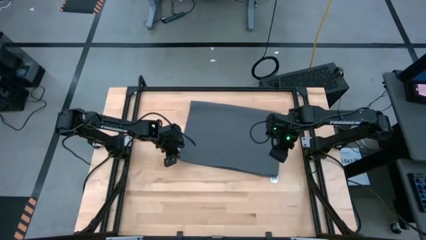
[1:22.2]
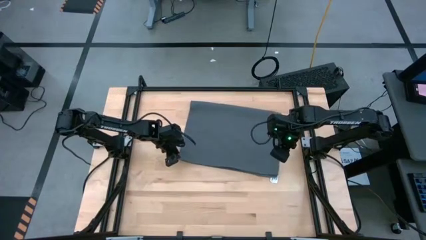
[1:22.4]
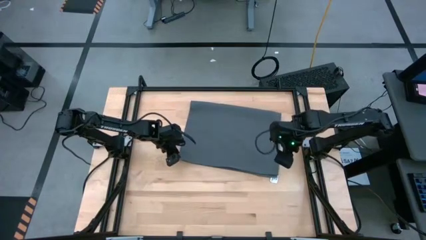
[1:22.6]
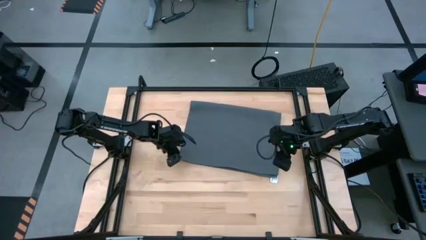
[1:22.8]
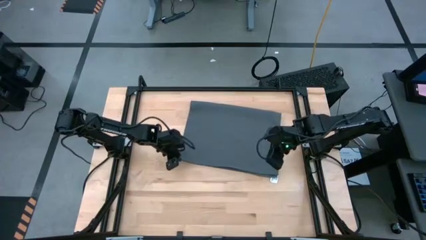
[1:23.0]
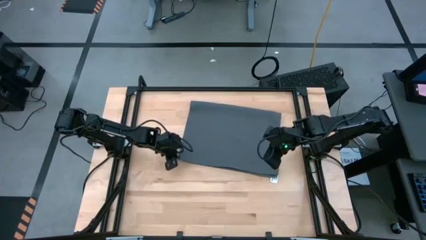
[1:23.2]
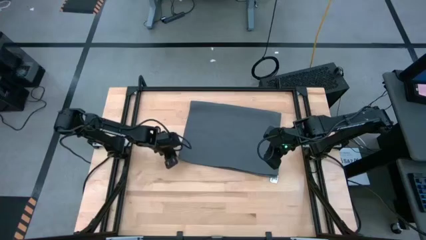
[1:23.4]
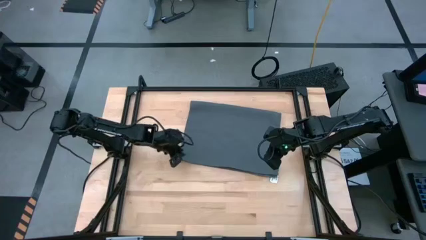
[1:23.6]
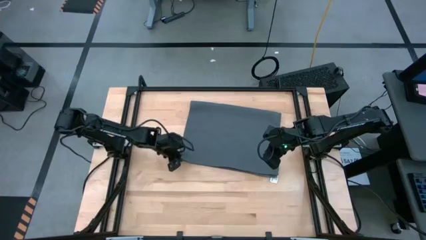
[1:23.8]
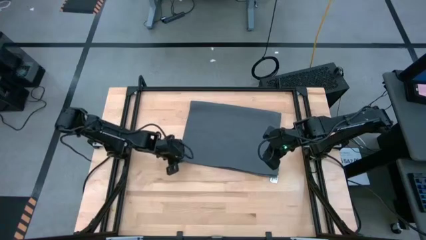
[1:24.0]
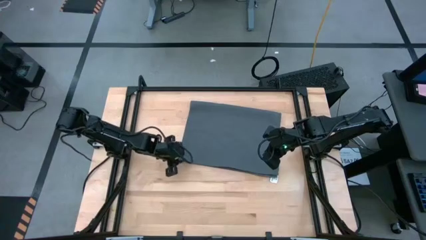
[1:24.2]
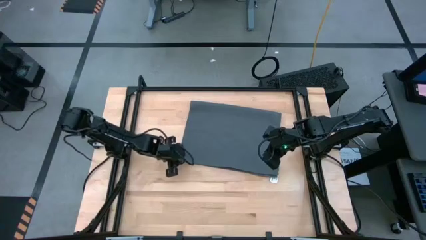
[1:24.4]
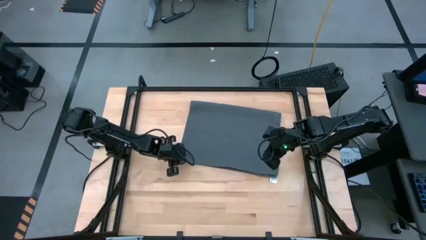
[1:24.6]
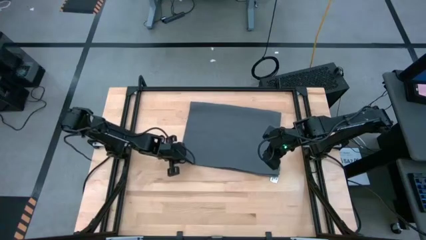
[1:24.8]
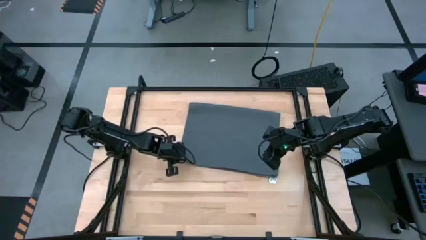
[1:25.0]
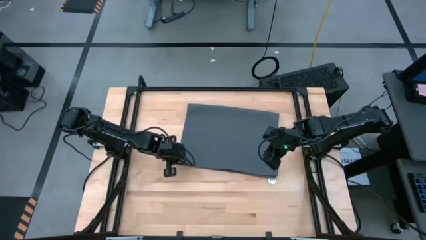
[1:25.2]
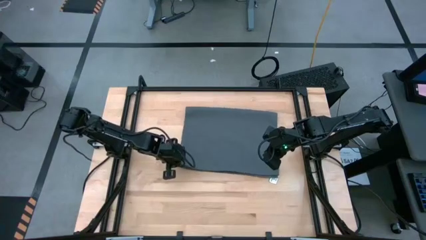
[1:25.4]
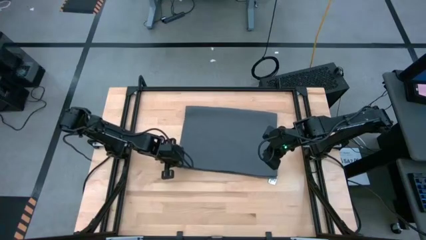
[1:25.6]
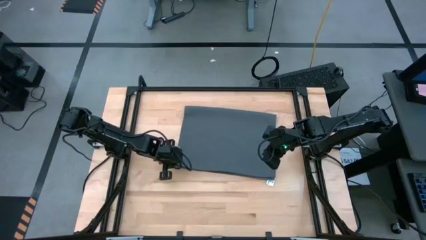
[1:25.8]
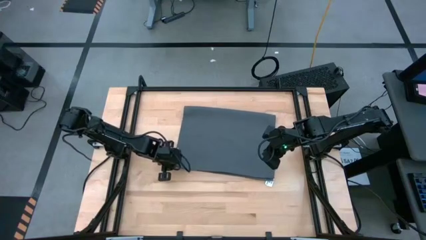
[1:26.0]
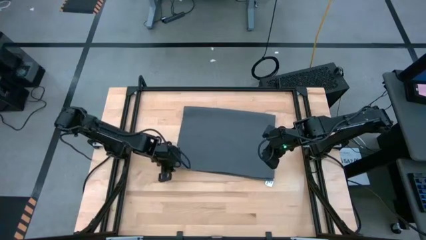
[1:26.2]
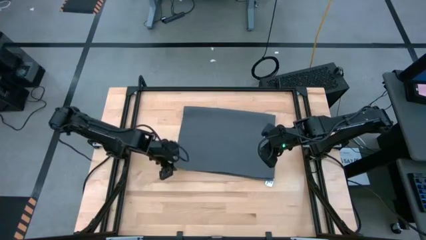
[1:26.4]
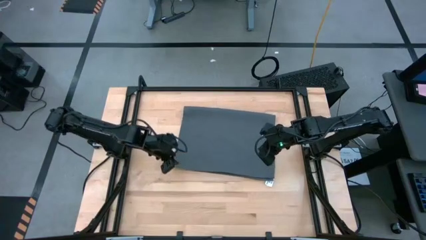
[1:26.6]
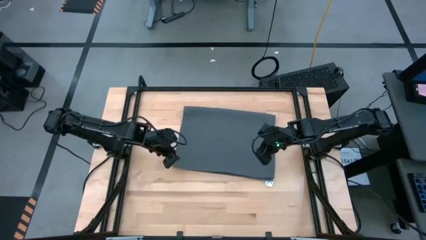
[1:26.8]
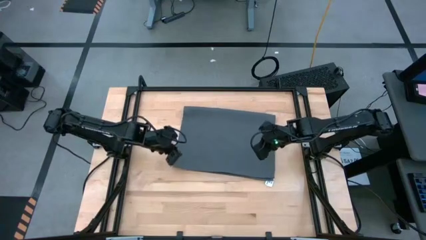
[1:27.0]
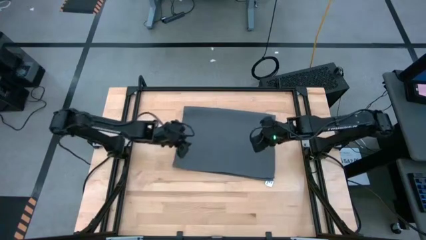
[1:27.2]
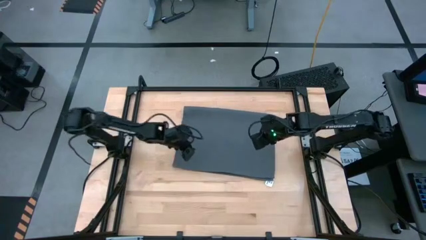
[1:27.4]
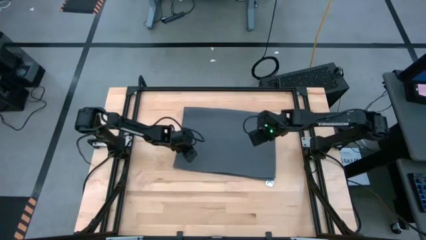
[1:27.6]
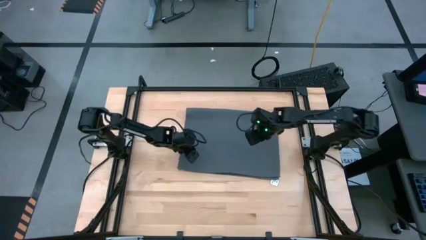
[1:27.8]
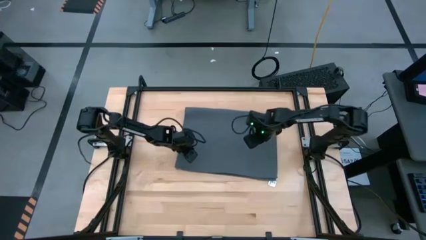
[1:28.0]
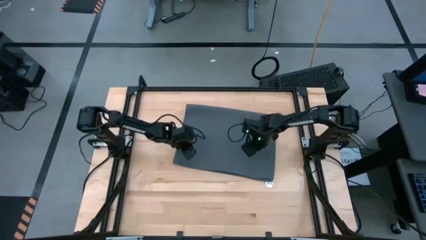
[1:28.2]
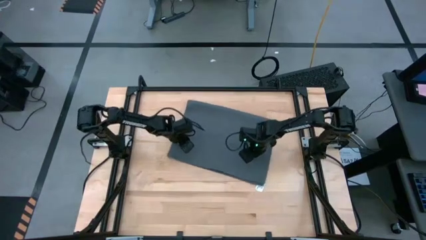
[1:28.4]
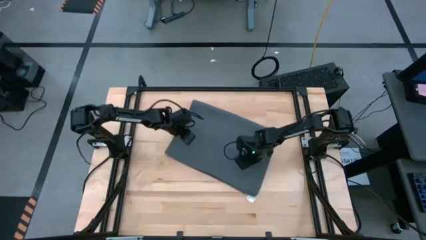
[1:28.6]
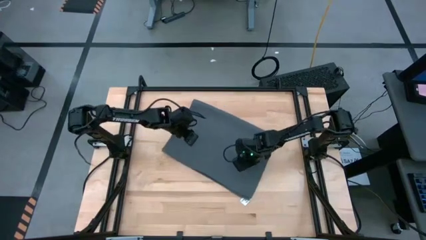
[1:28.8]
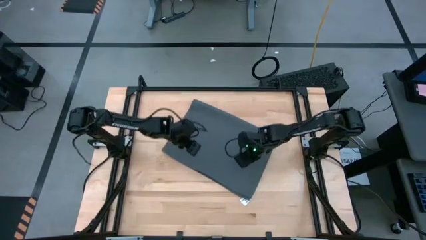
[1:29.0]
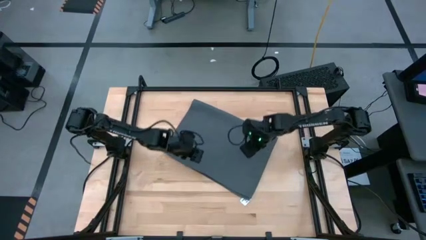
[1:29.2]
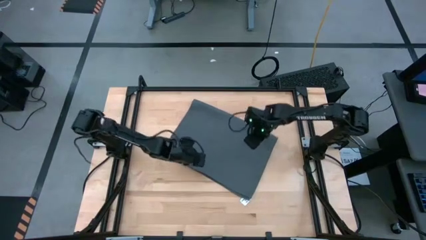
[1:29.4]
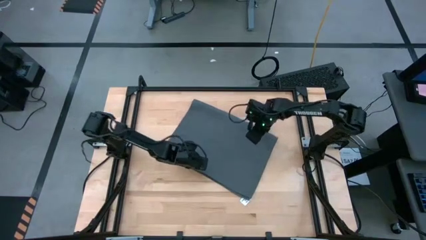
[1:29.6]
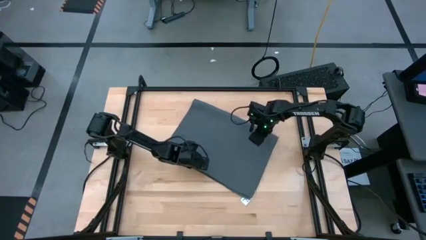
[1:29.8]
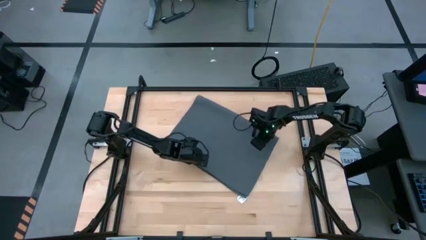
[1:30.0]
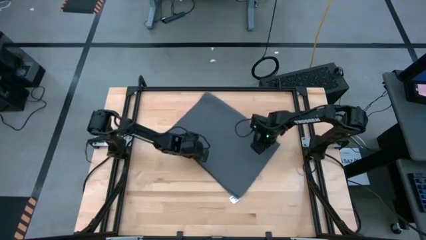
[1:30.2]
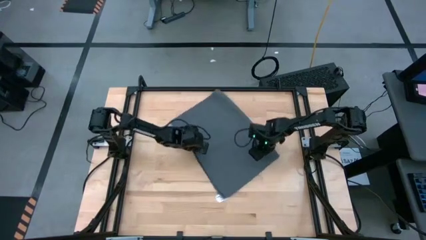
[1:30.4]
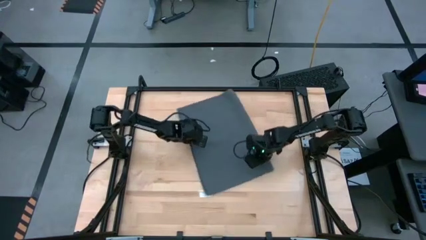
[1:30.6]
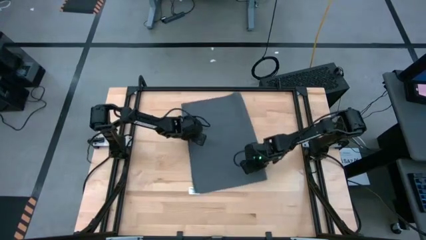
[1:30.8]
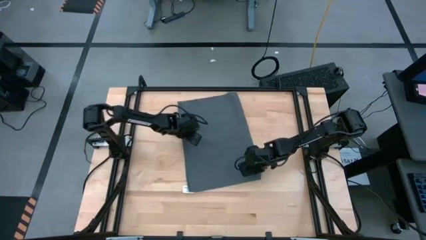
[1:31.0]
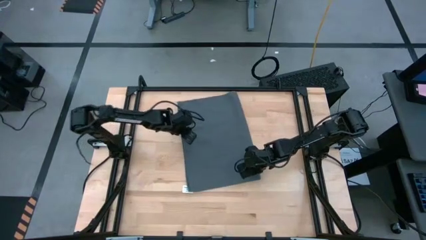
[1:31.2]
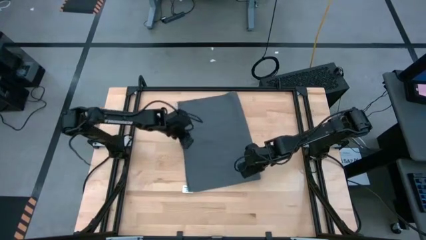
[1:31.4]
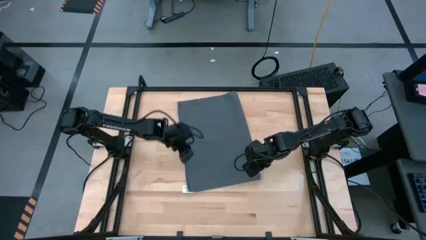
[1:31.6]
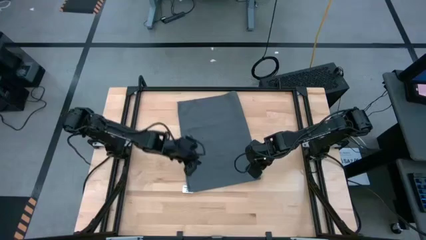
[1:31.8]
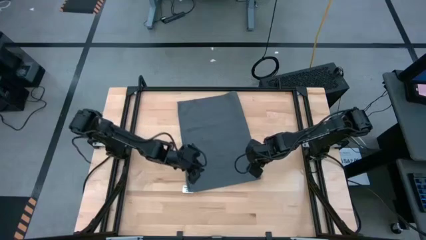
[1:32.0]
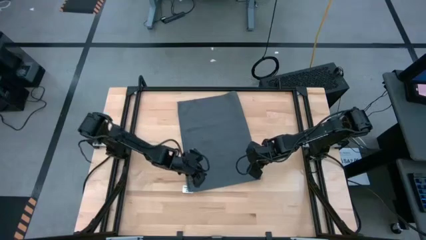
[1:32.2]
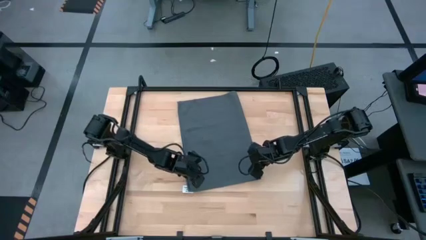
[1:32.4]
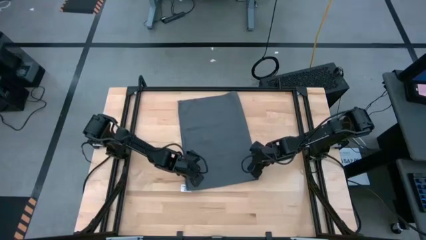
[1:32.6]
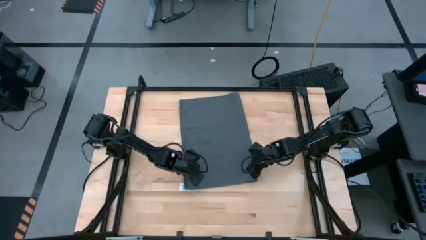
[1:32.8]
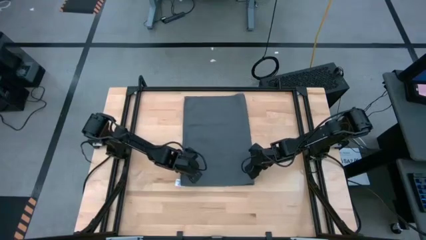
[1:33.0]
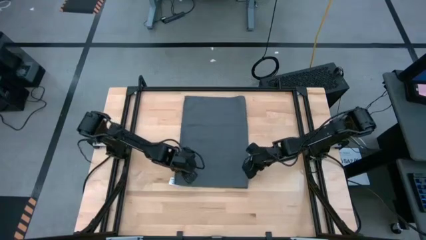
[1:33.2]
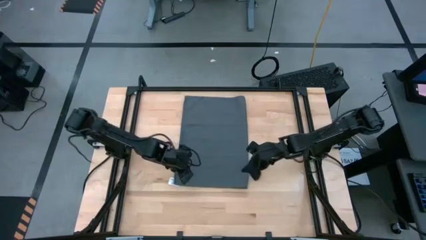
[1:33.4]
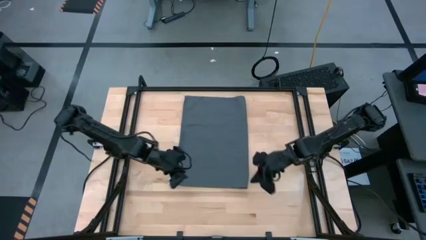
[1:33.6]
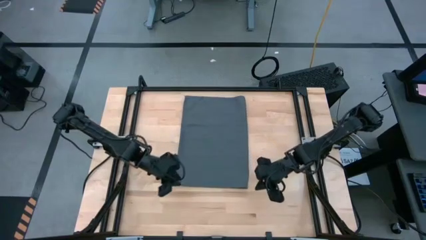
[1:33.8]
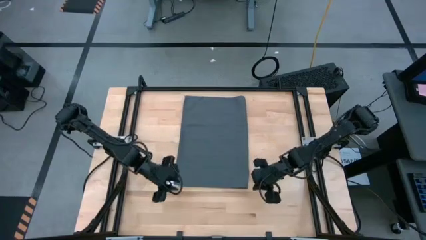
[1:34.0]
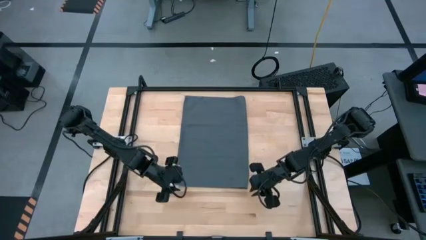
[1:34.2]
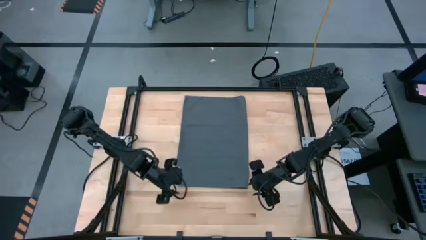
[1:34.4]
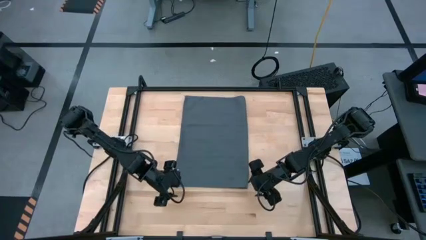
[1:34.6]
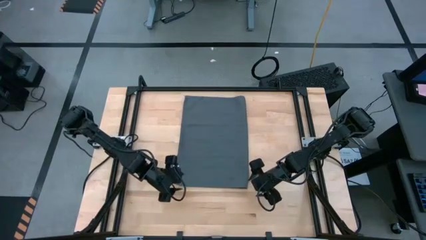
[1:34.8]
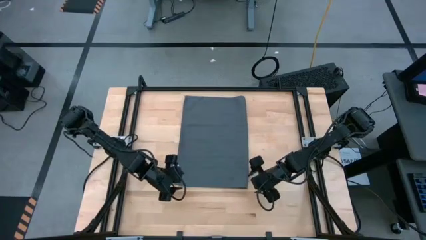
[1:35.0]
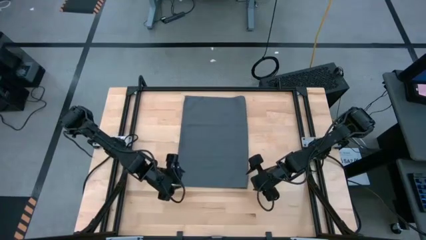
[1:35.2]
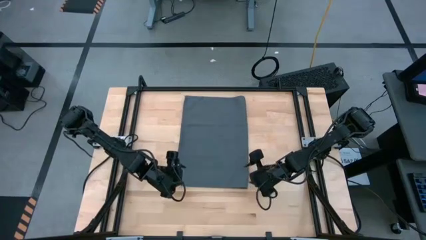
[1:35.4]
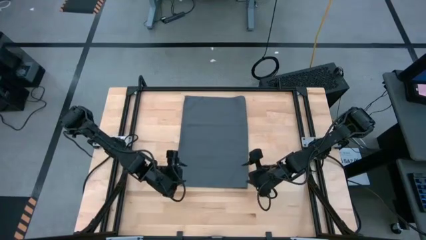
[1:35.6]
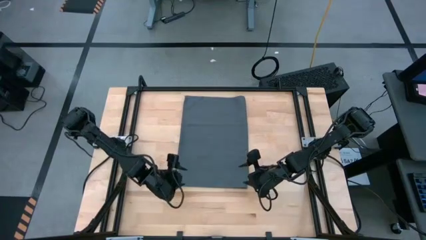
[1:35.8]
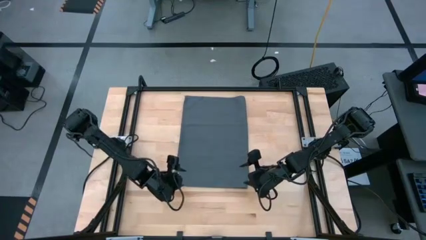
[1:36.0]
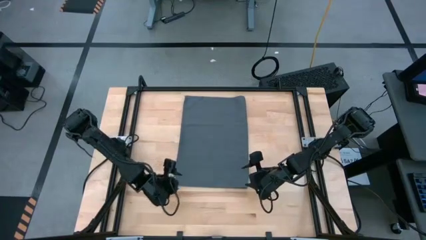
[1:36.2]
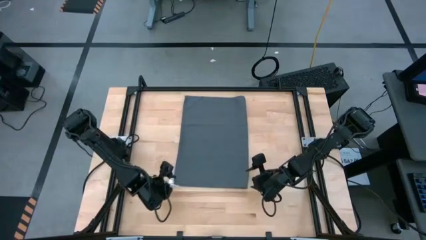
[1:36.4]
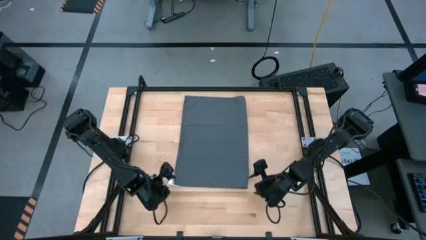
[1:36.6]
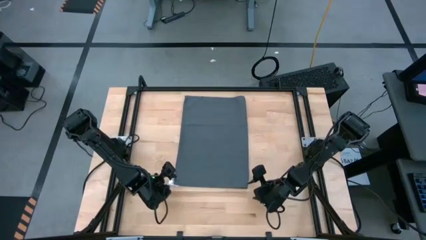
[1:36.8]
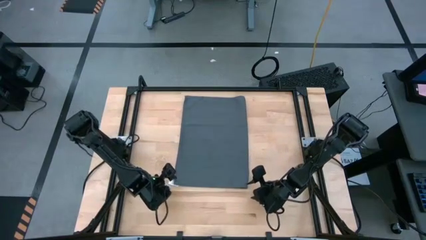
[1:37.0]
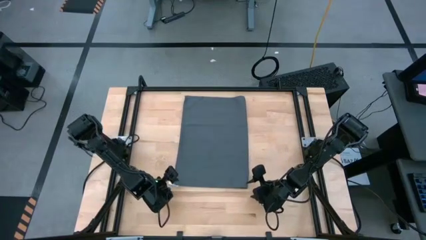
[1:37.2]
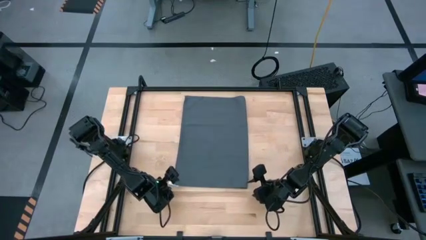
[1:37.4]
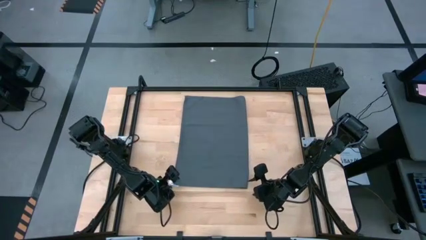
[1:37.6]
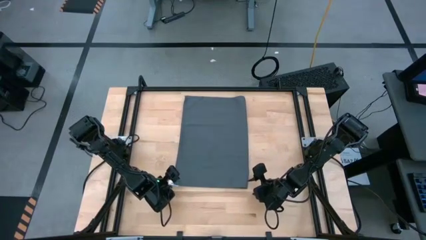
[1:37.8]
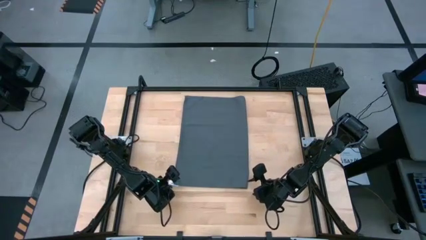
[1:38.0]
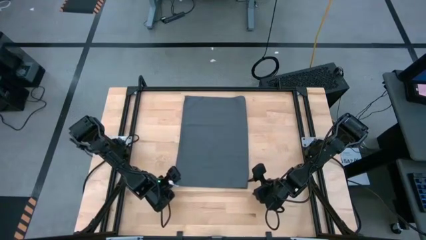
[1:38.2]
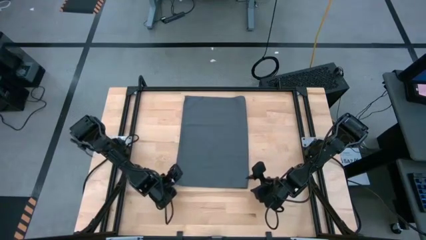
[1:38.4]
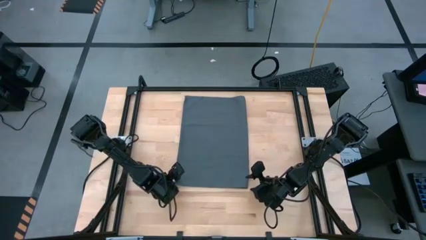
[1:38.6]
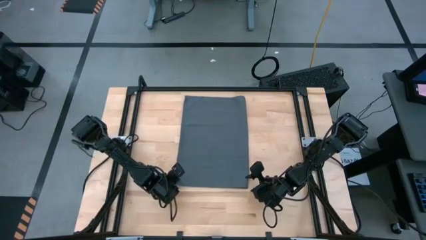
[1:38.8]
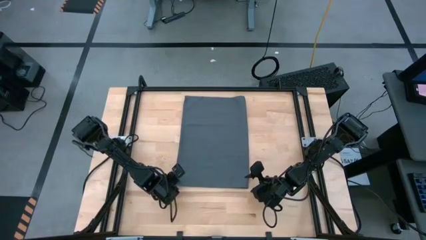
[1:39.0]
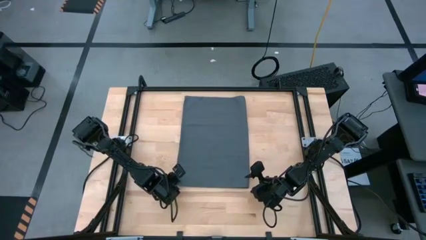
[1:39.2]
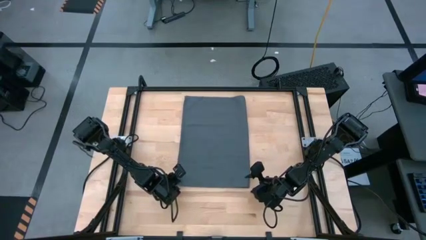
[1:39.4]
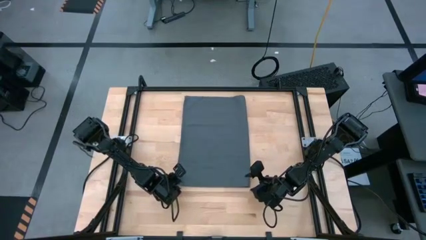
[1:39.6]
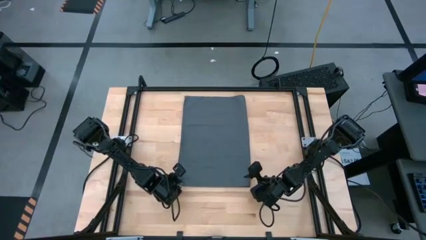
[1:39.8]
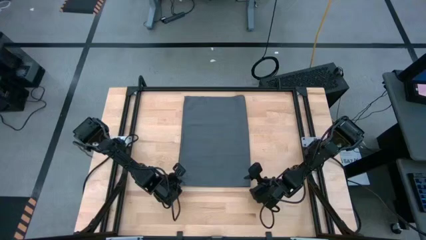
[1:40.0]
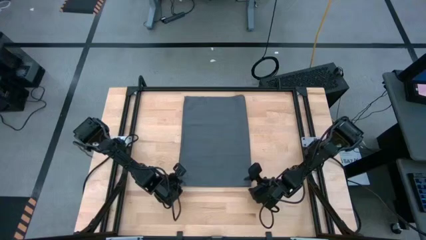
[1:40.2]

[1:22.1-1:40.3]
Task: Roll towel
Fold the gray towel on the center of table
